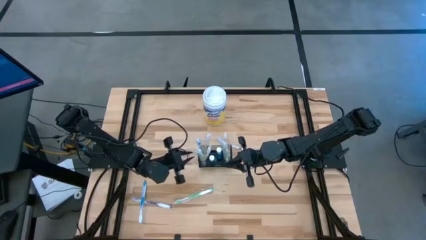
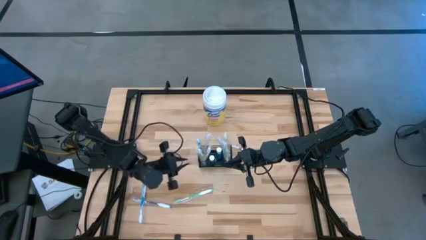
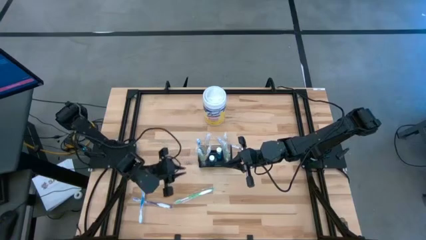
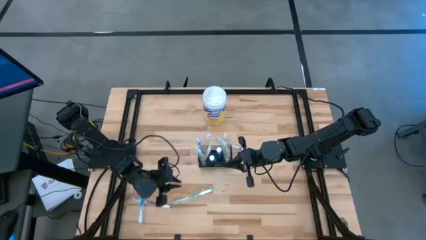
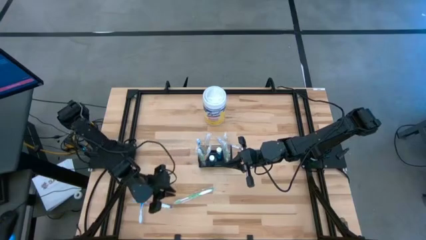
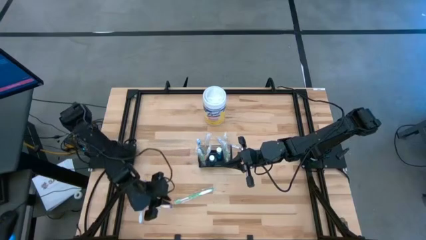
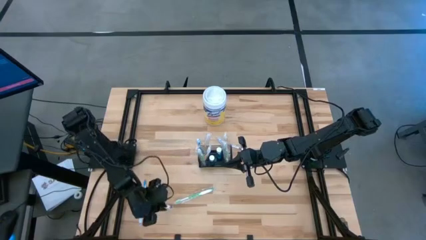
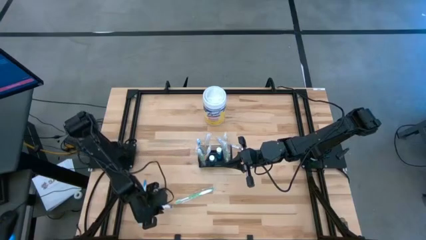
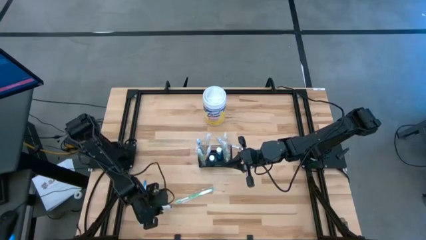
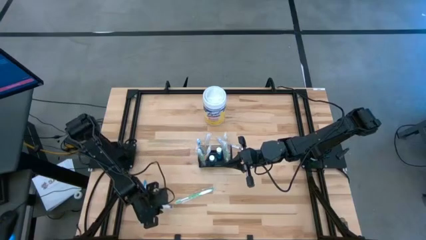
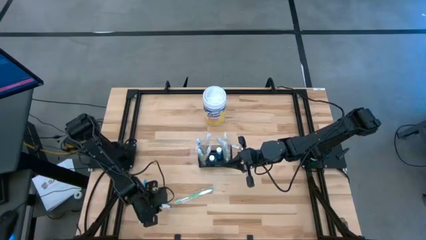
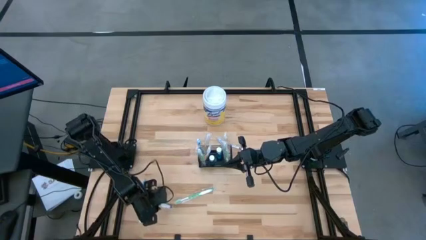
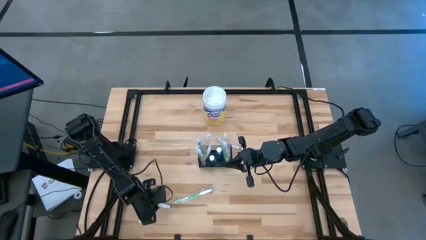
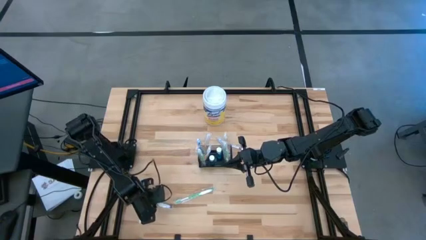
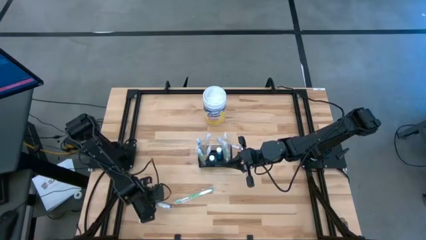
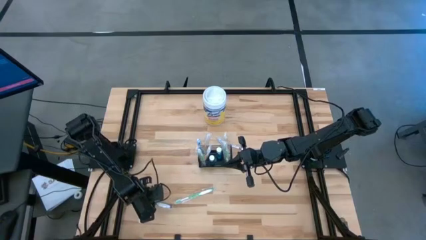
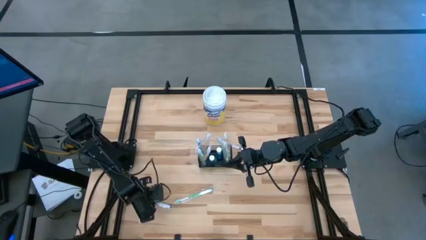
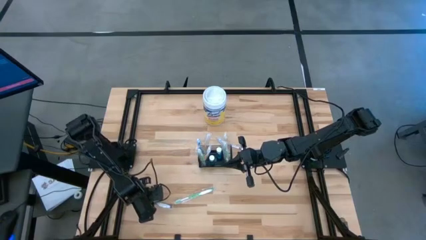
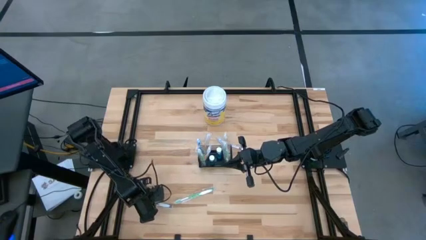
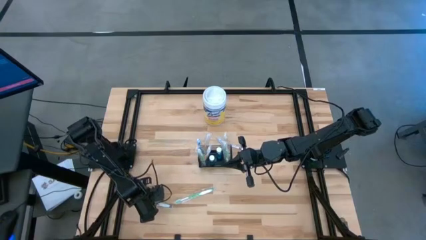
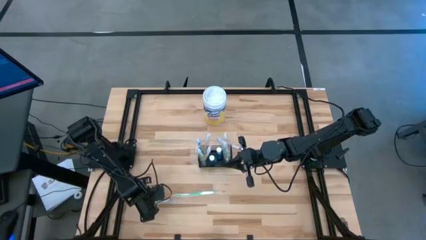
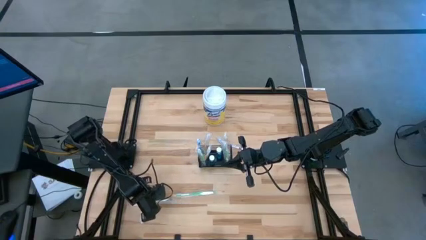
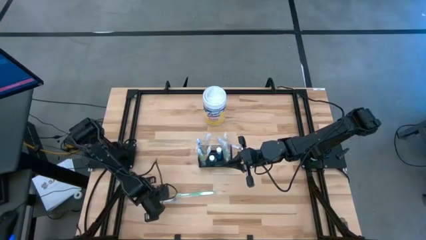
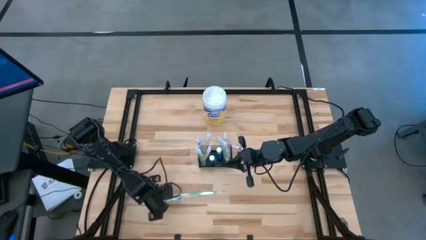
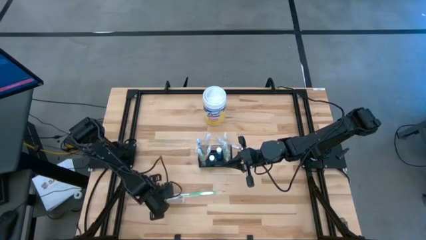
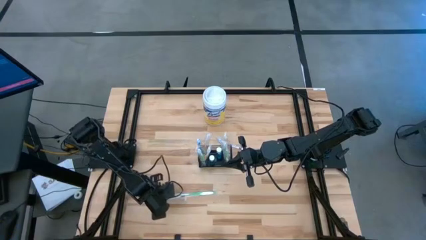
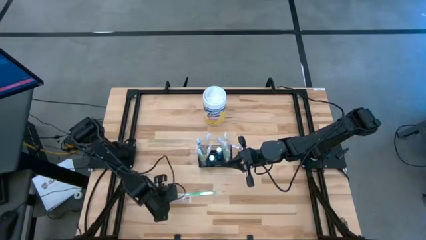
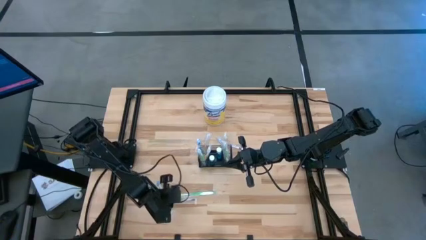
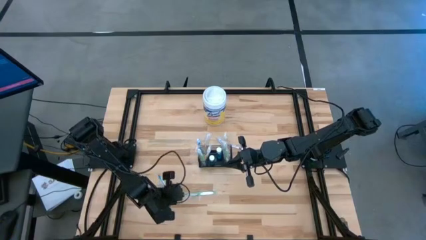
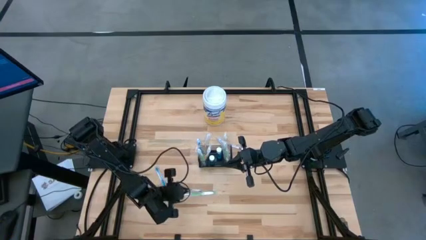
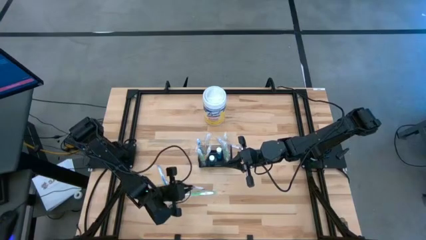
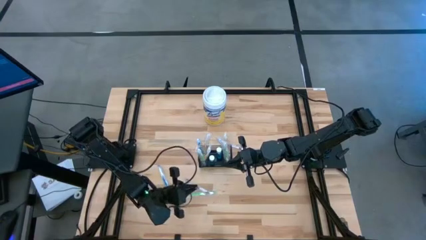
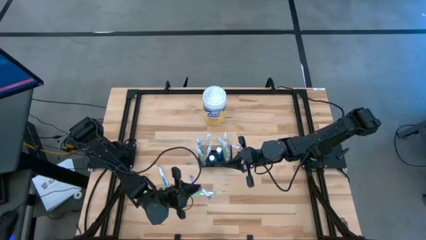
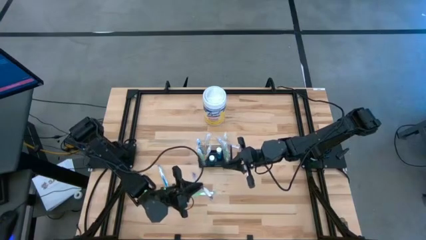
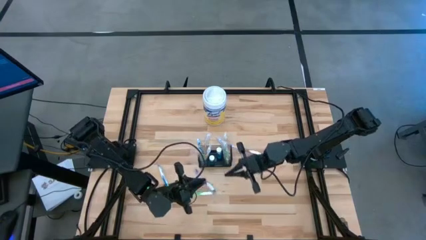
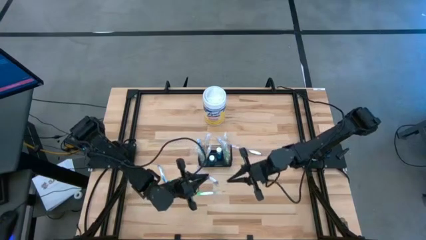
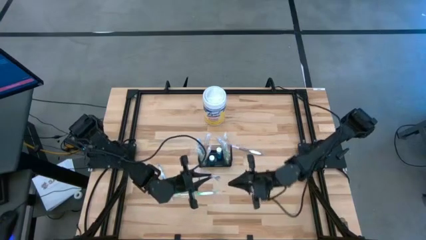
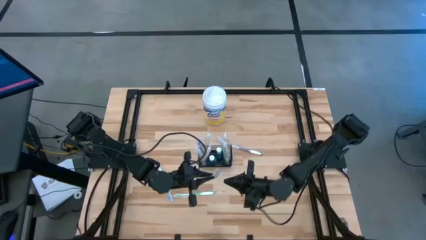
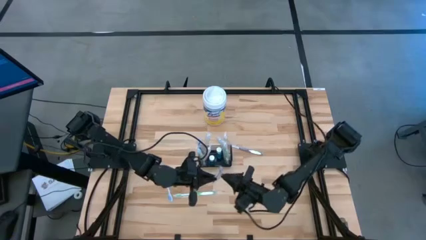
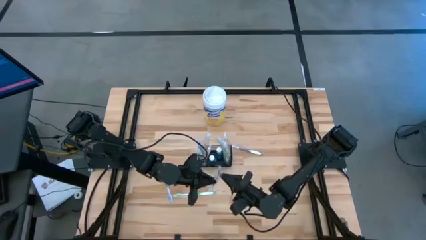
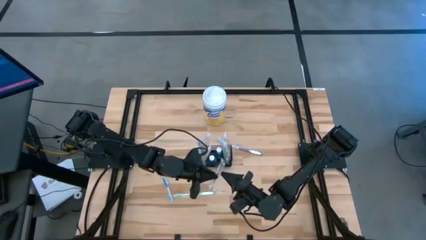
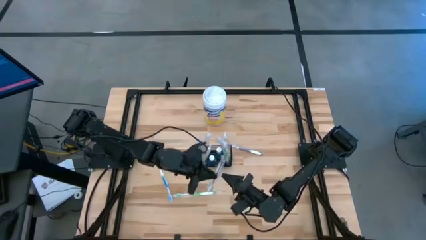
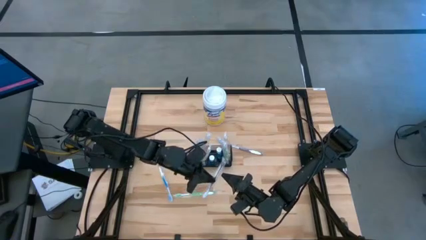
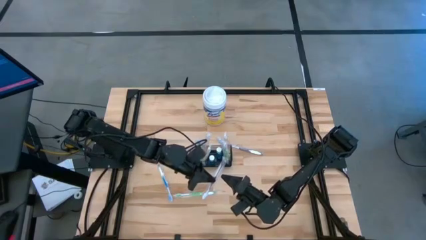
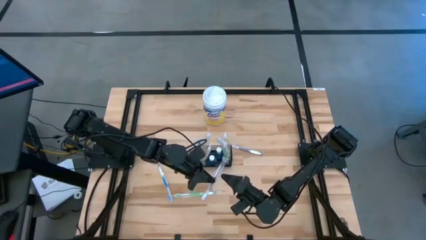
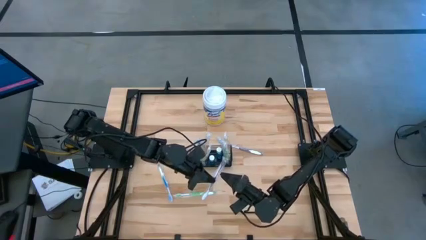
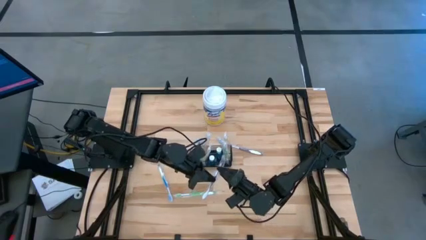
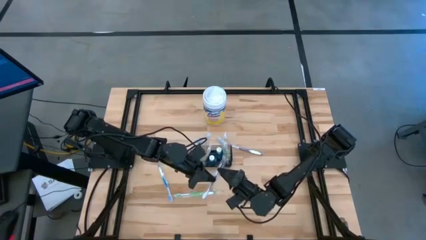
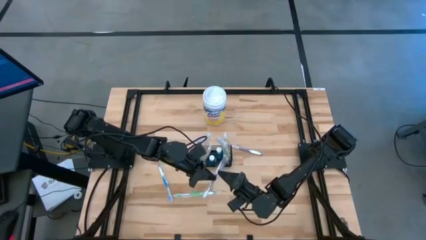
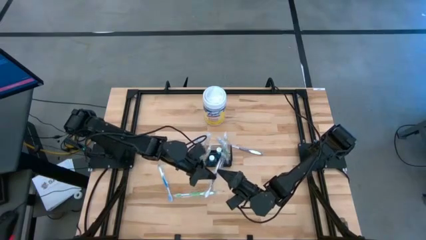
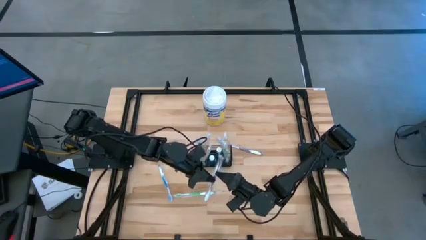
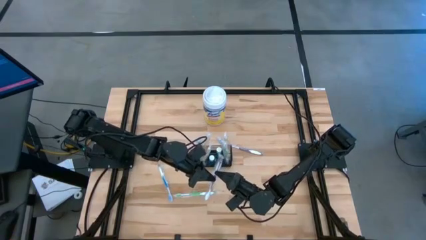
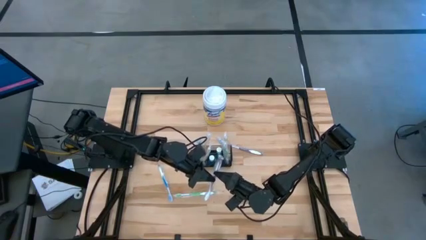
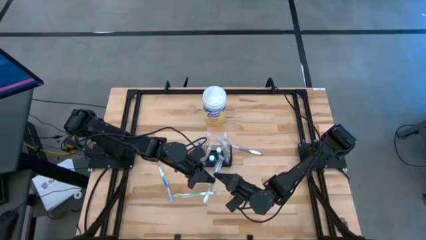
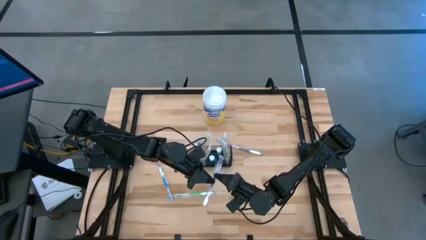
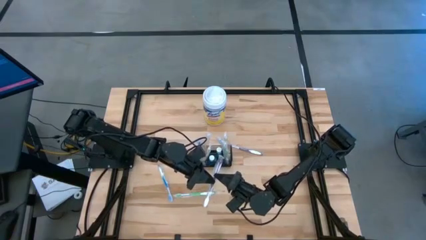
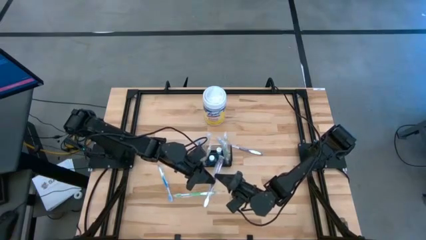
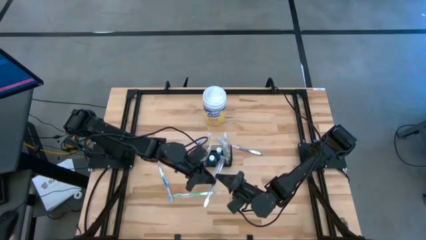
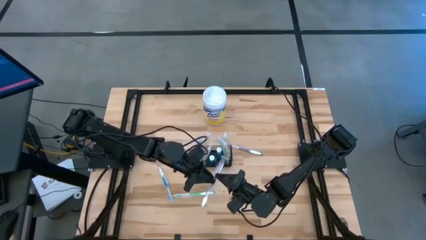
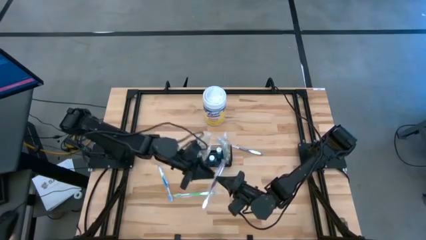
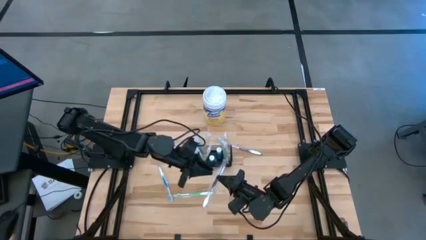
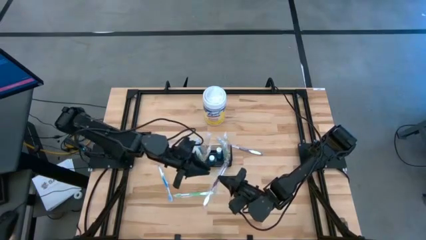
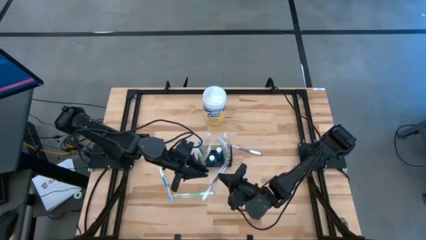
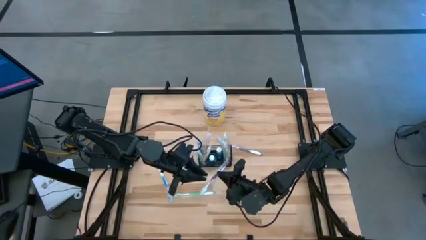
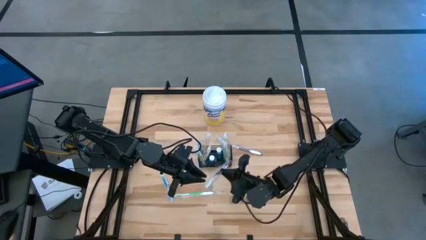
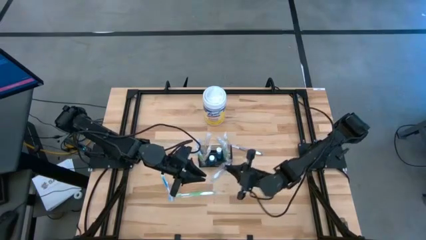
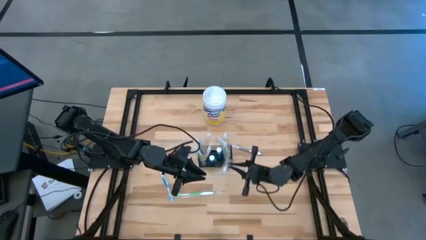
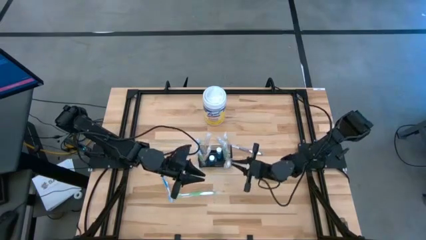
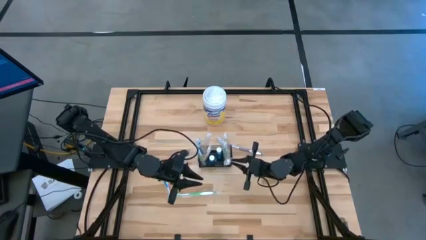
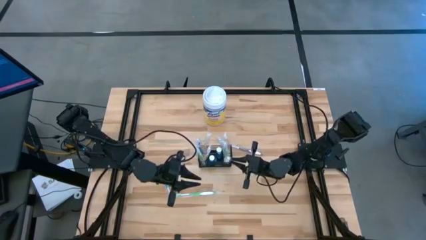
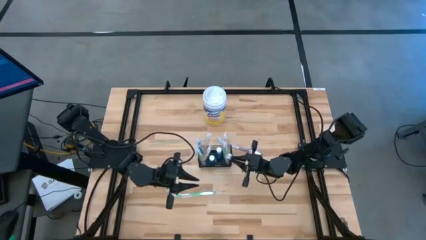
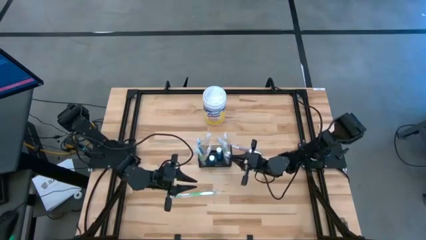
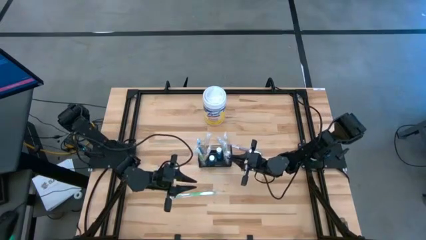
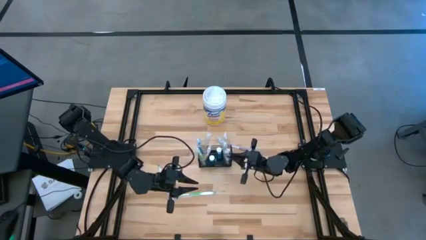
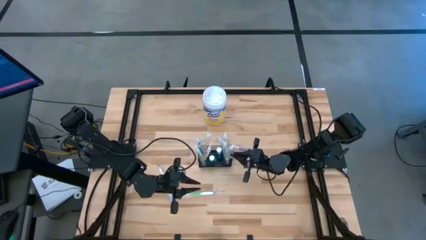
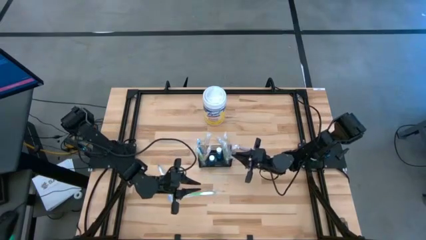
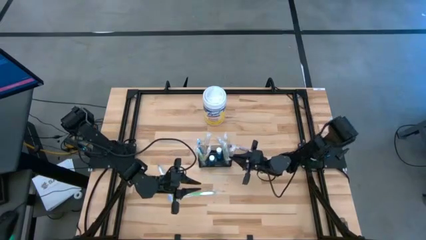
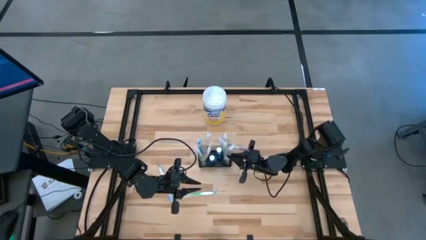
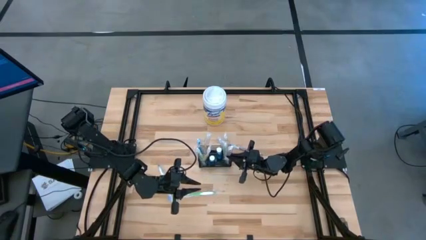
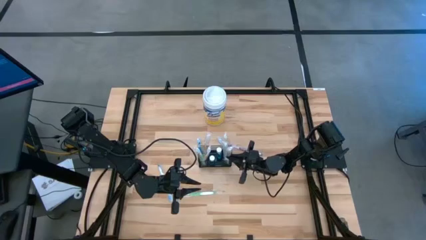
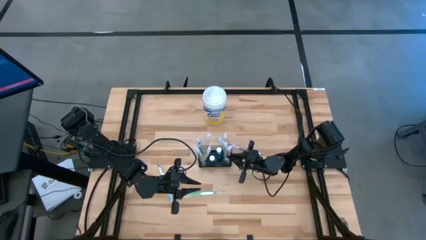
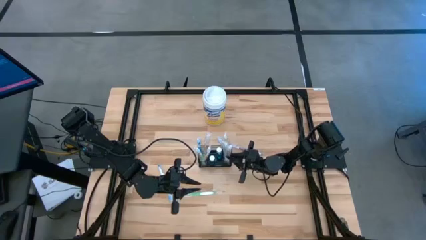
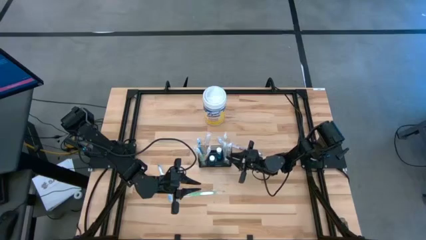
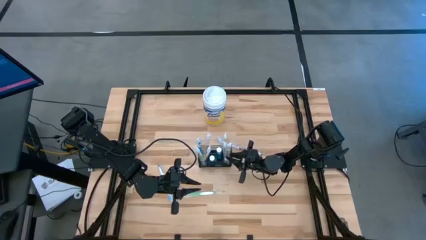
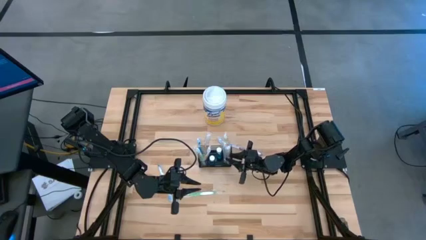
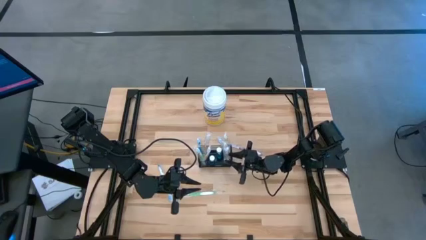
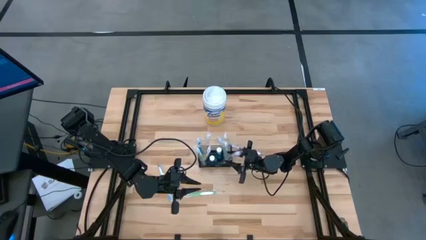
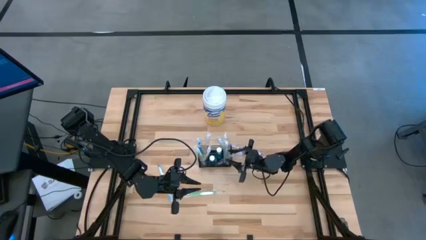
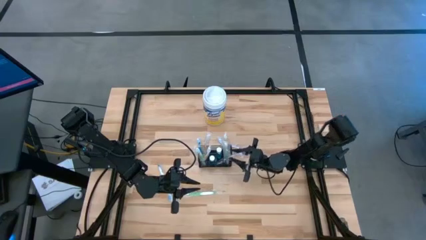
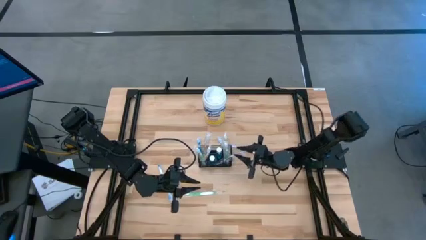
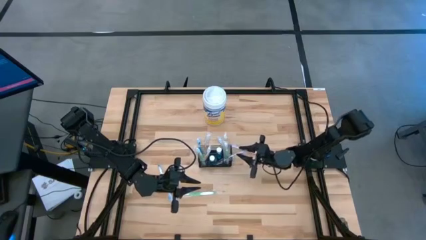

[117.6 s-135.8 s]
Task: Pick & Place toothbrushing station
Put the bottom purple toothbrush into the mesh organizer
